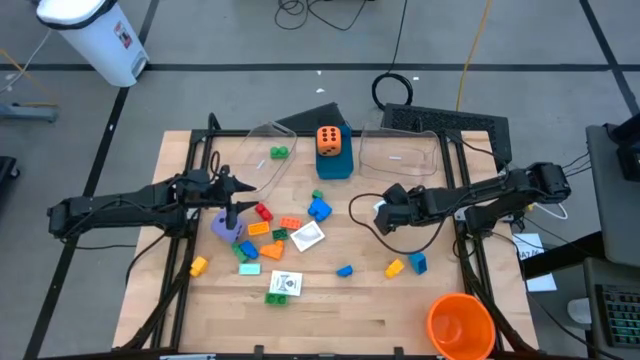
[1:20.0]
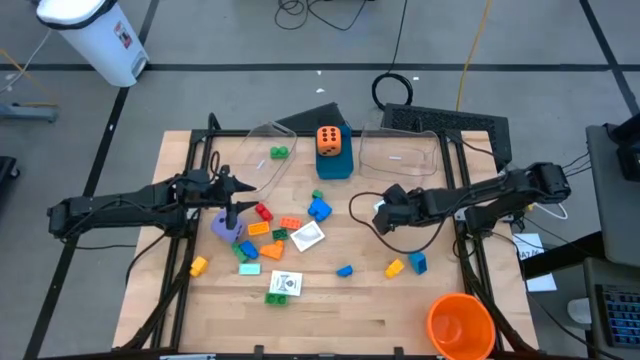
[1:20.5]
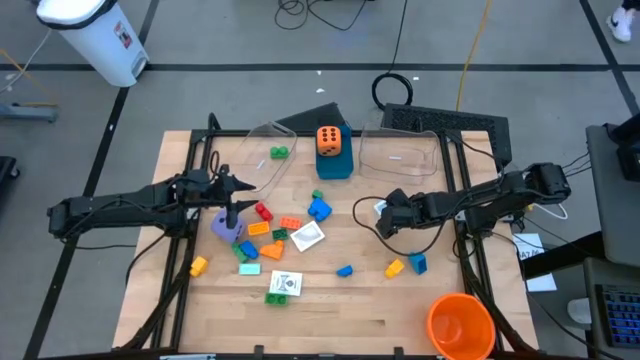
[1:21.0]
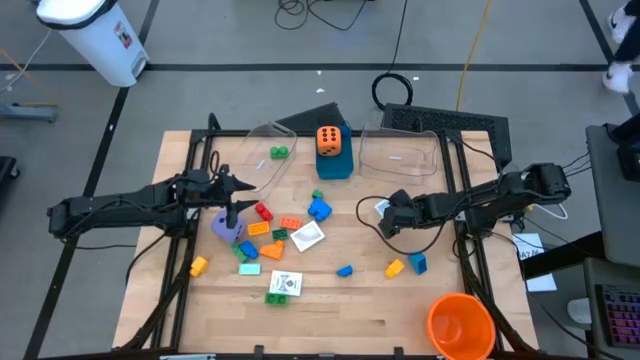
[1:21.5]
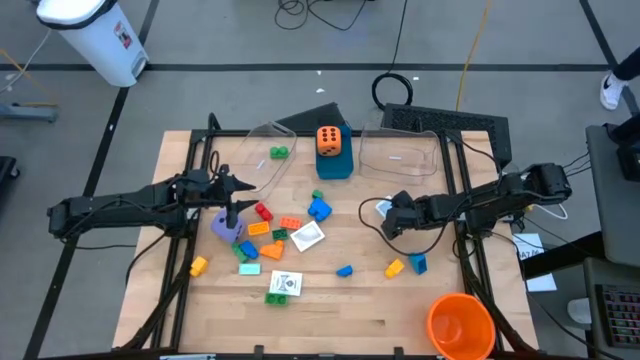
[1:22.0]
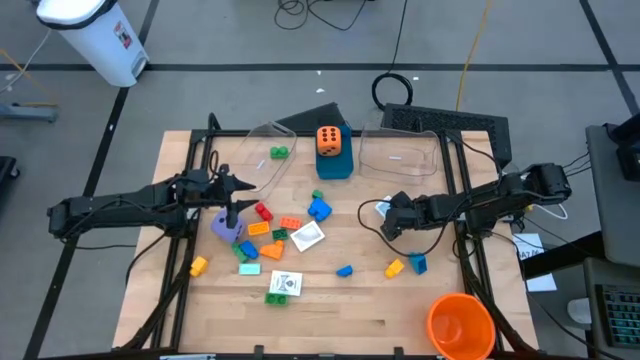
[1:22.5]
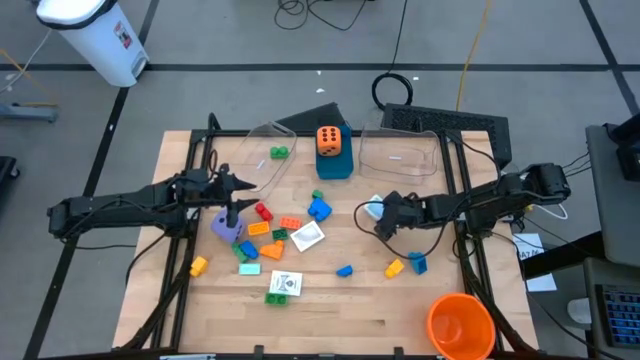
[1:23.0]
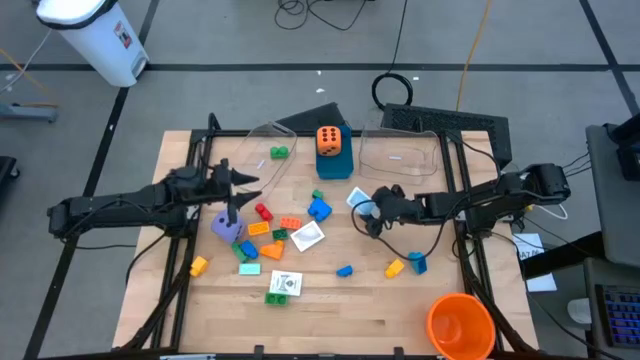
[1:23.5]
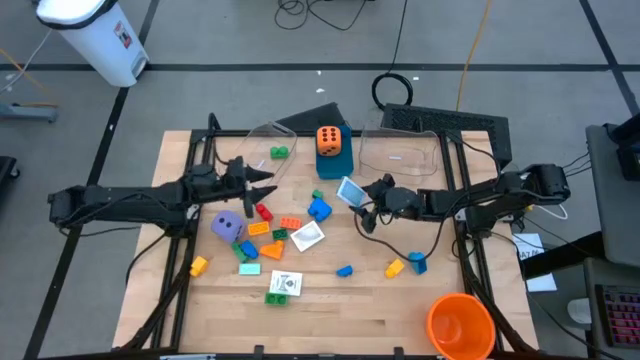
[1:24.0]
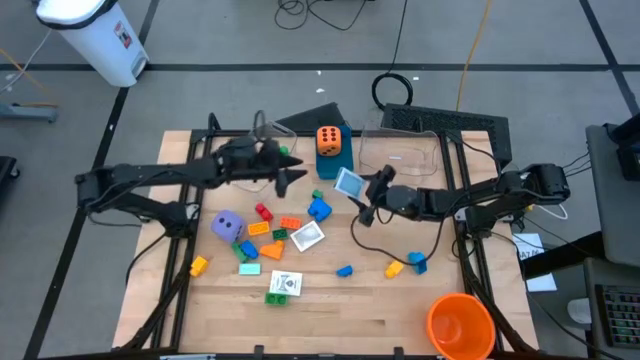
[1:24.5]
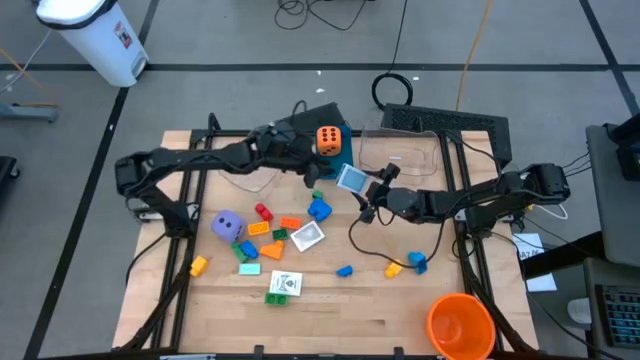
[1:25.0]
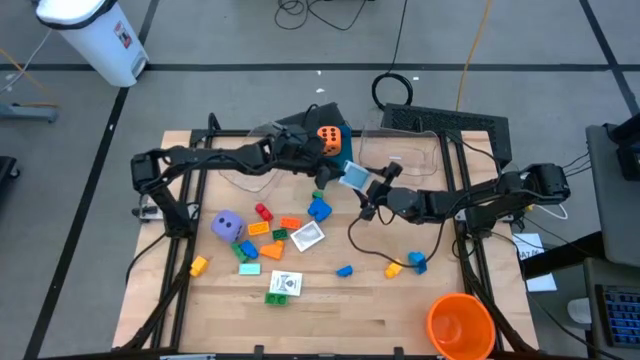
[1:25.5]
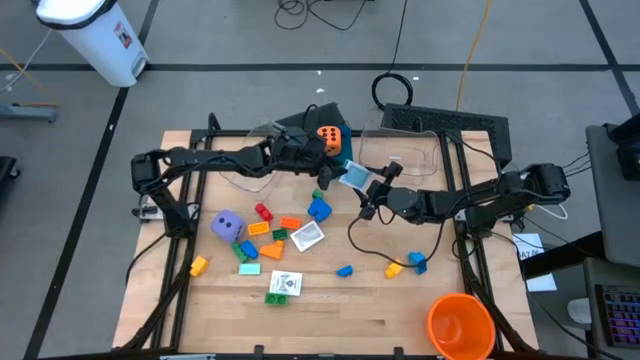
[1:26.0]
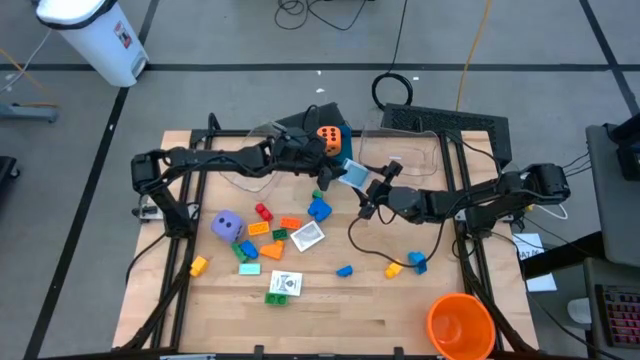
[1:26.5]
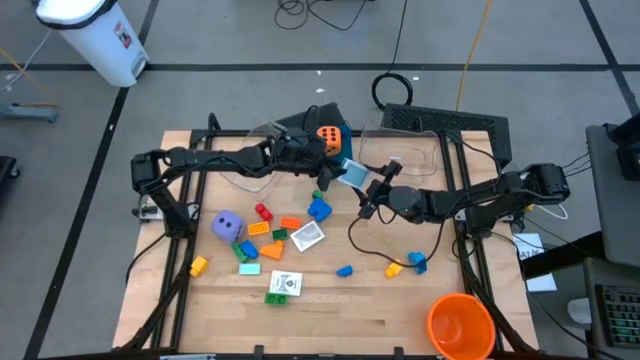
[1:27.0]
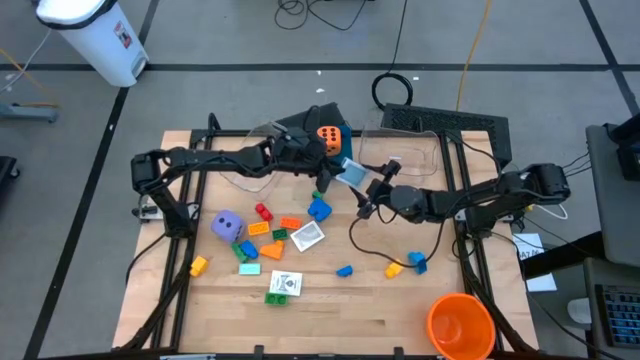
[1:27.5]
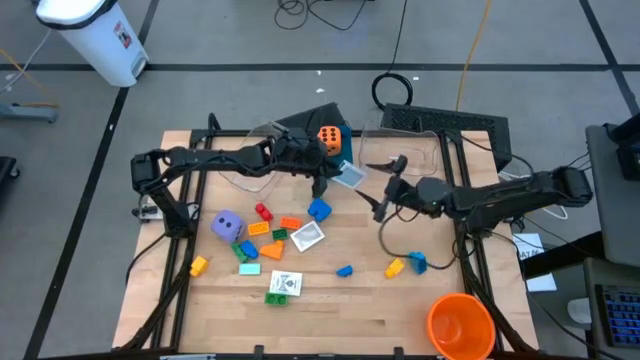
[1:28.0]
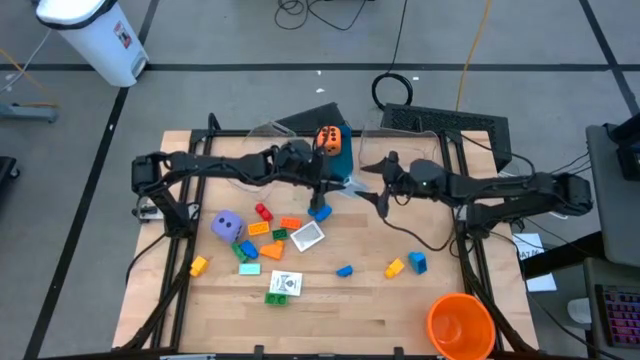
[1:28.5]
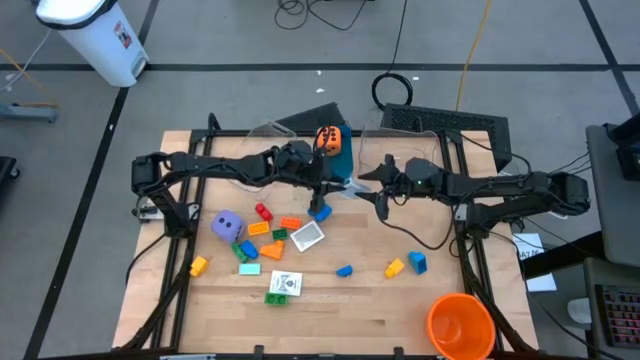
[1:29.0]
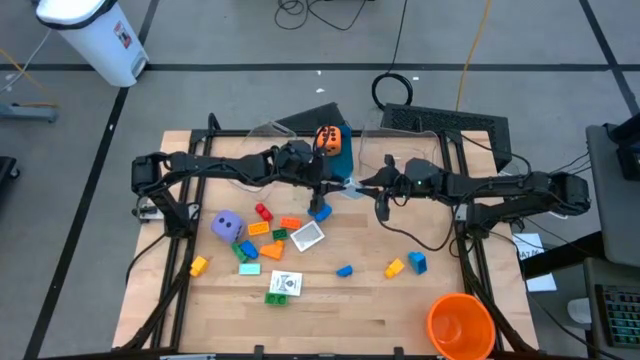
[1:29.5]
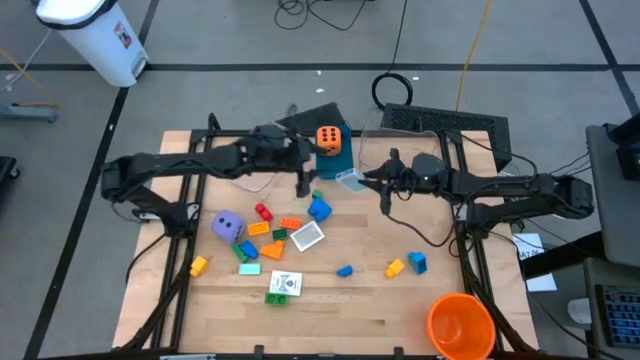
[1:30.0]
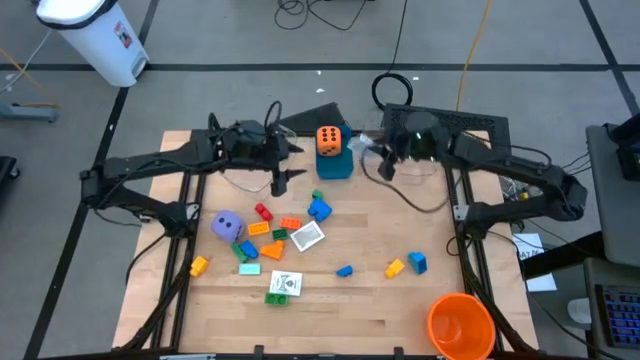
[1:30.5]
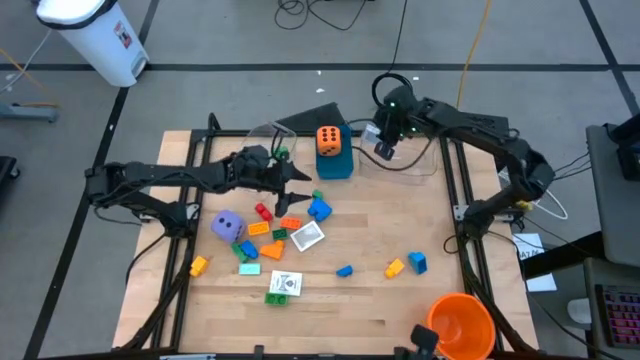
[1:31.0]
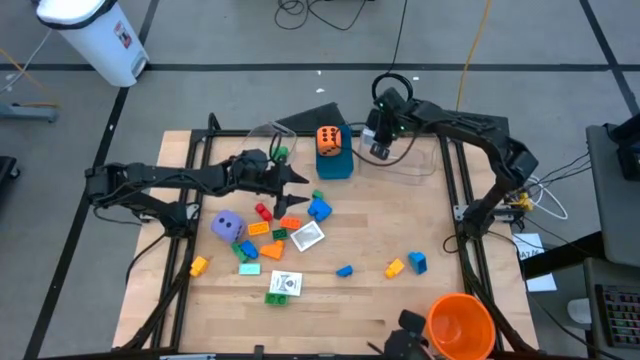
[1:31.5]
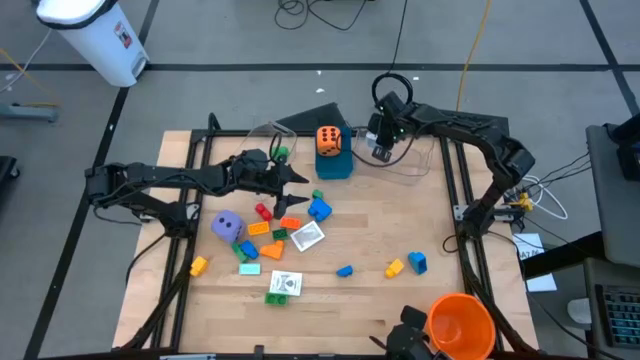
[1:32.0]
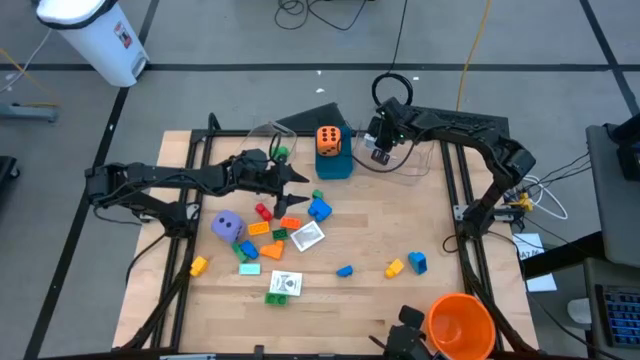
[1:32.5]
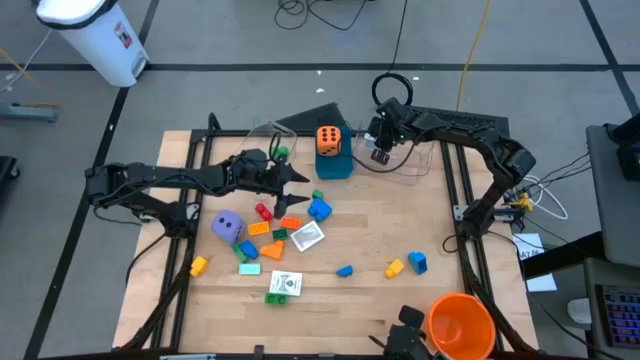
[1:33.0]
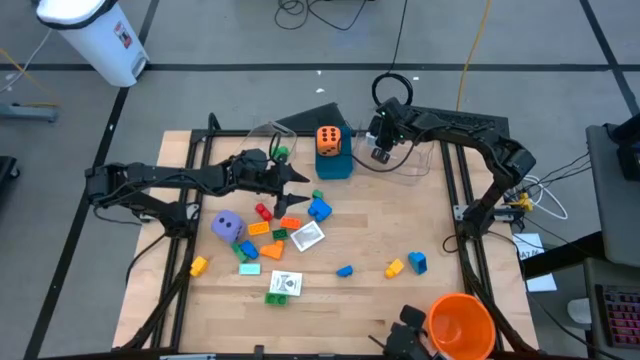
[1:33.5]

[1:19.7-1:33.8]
Task: Pick & Place Toys
Put the green playing card into the right transparent bin

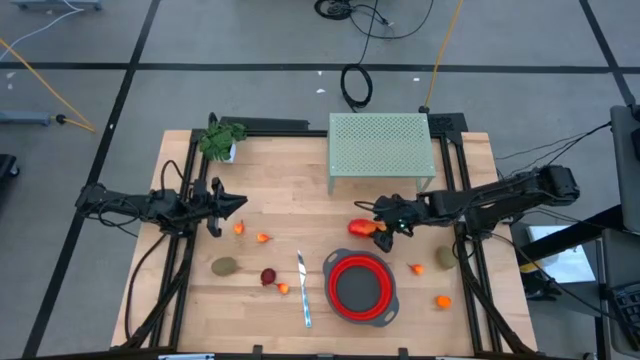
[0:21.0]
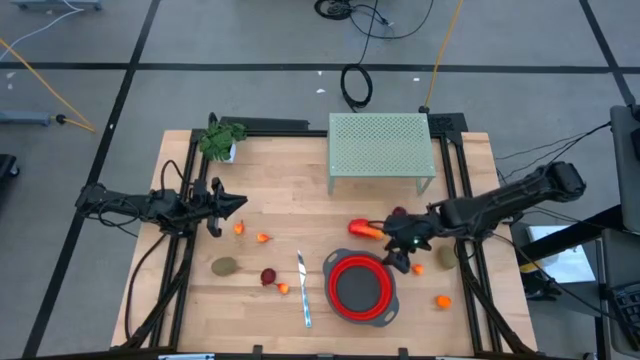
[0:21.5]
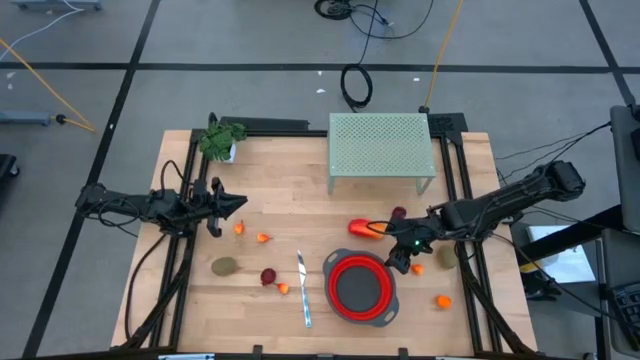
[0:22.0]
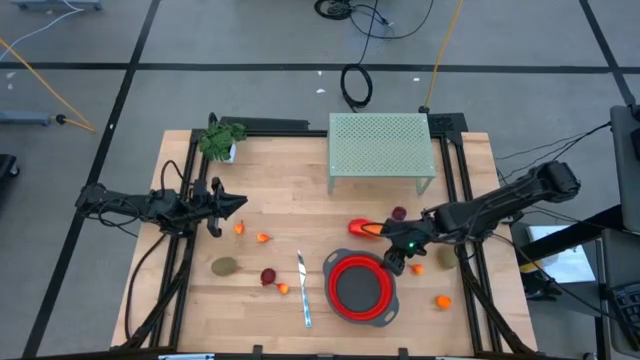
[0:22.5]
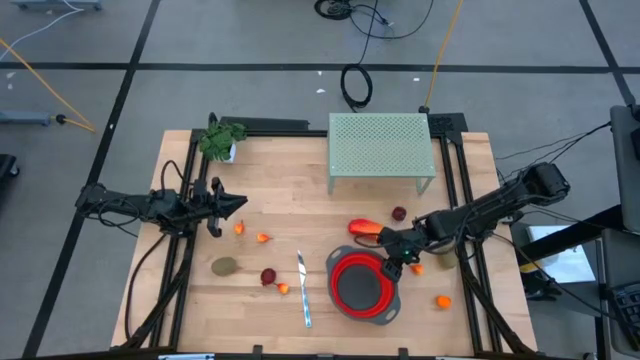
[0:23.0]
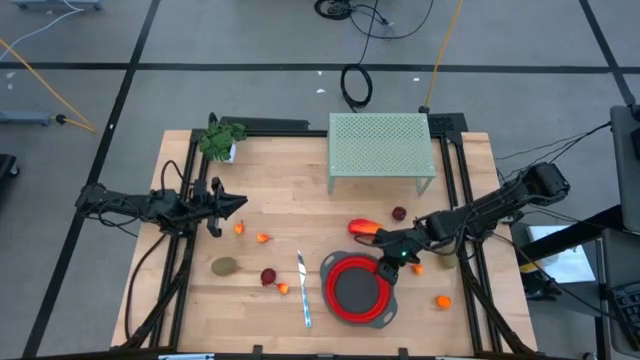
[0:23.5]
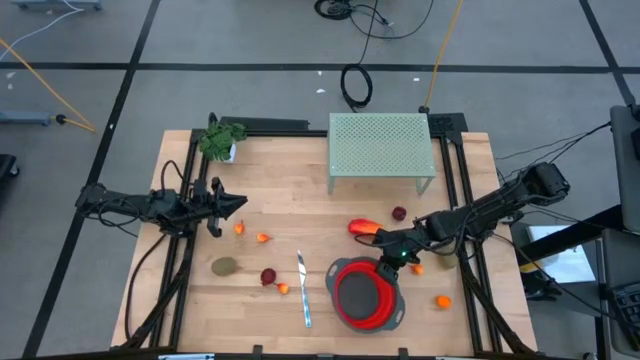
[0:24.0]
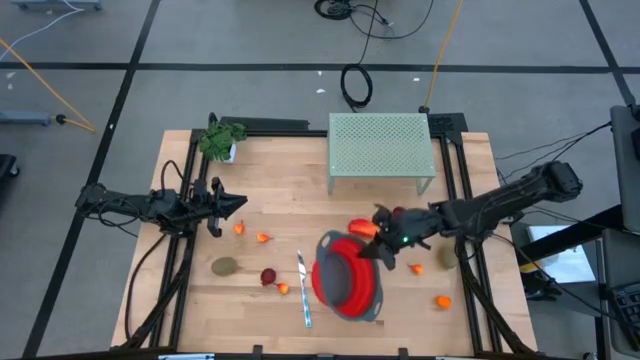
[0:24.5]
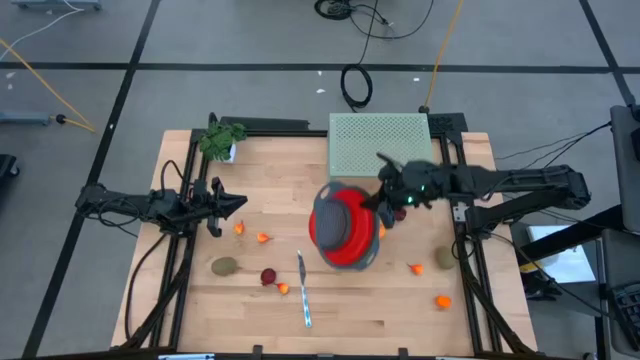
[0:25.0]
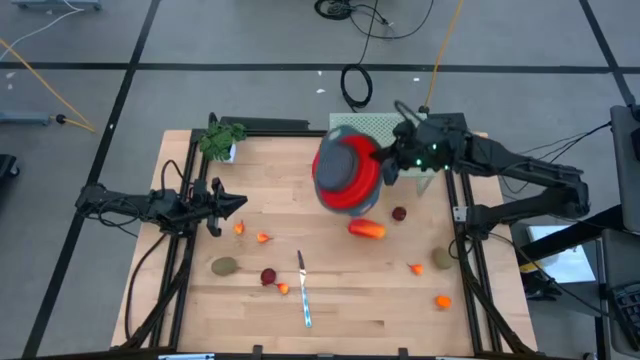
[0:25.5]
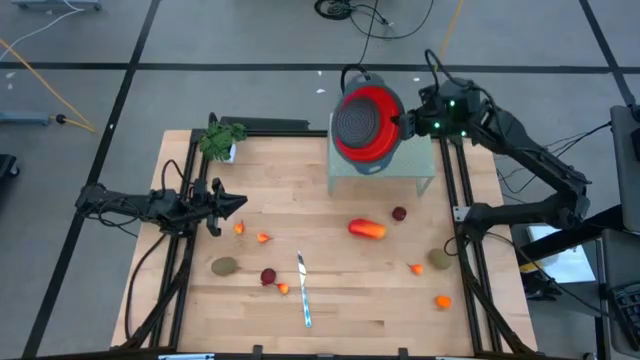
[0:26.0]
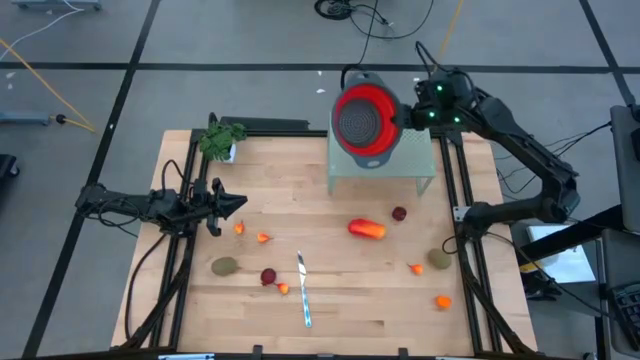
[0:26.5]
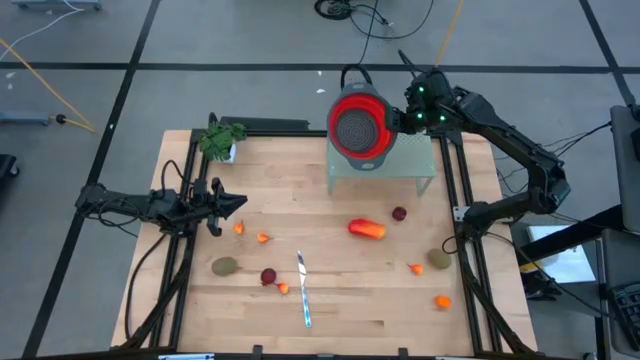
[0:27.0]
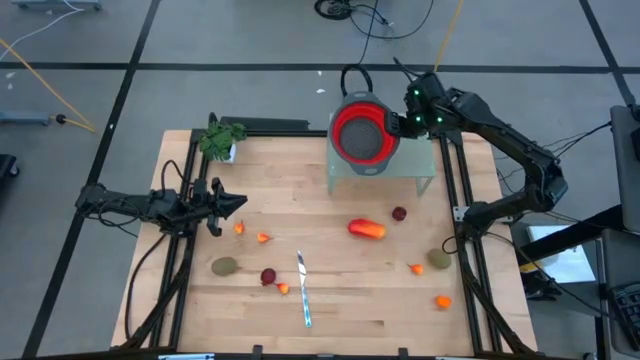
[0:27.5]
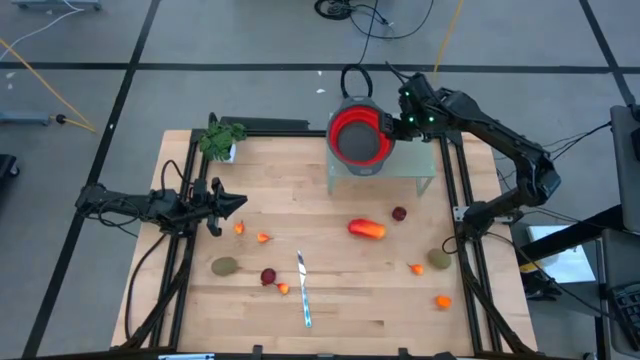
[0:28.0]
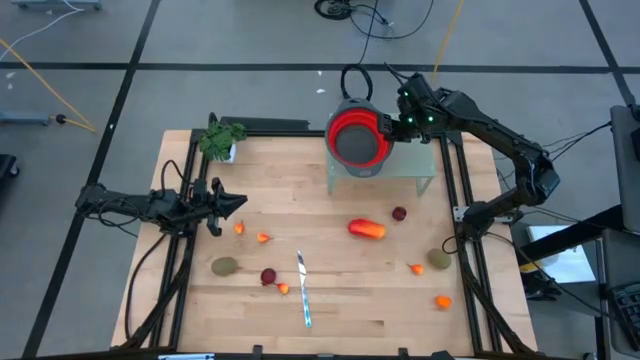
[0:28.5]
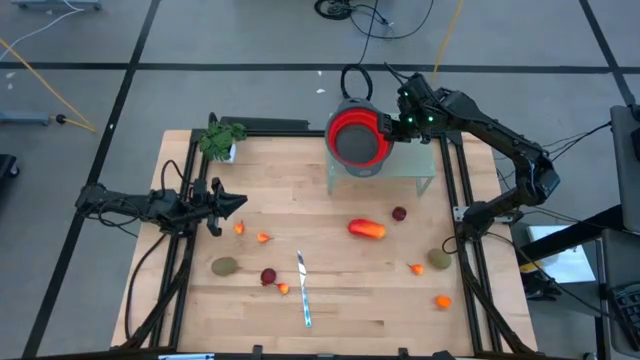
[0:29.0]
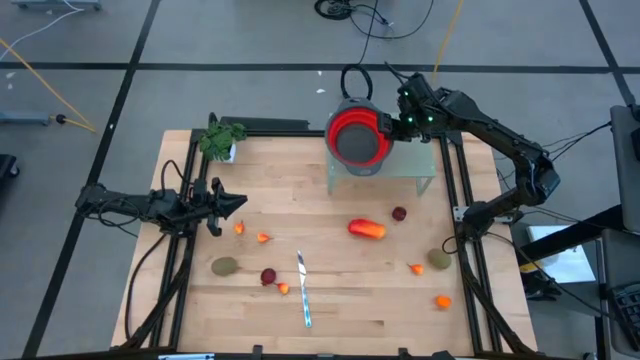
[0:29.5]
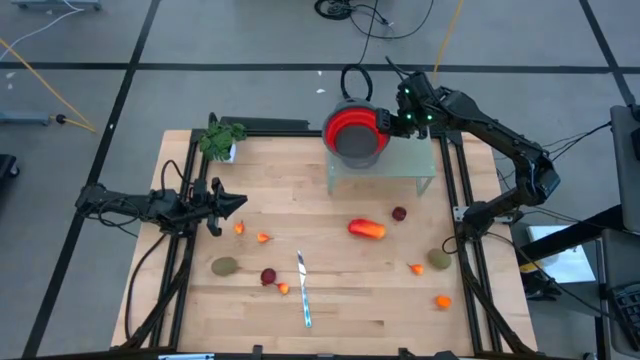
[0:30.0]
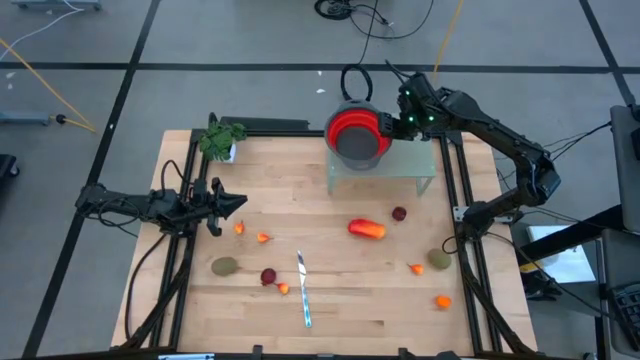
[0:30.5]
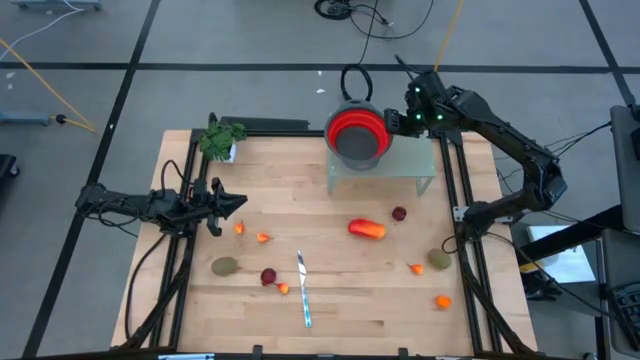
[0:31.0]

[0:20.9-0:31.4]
Task: Pick & Place Fruit
Put the red strainer bowl on the shelf
